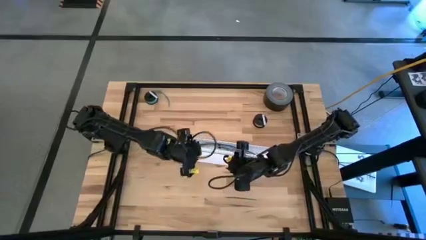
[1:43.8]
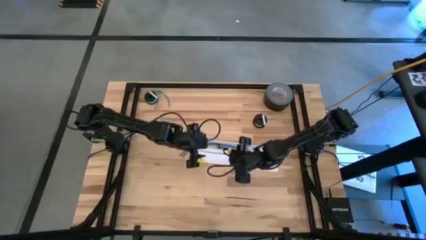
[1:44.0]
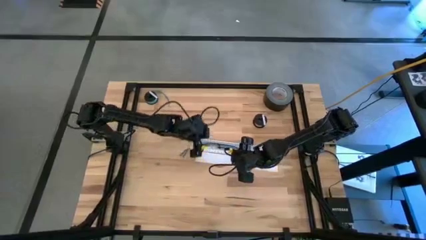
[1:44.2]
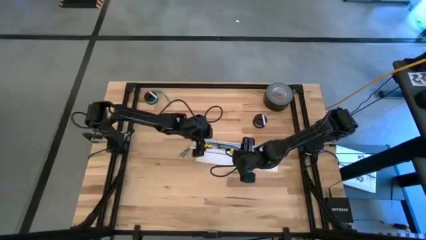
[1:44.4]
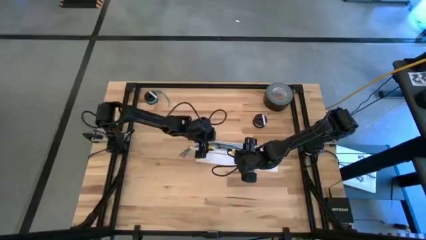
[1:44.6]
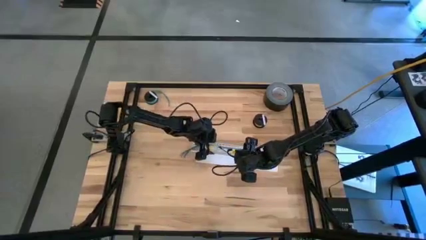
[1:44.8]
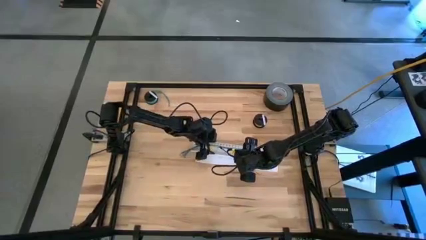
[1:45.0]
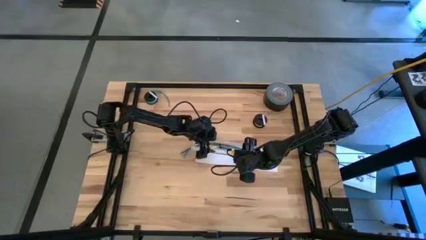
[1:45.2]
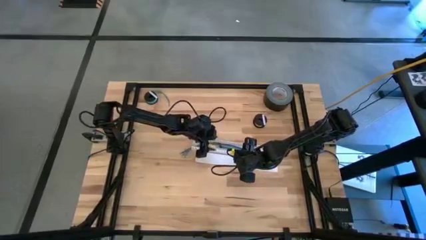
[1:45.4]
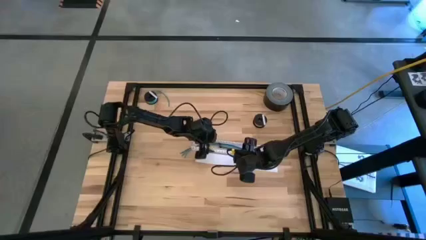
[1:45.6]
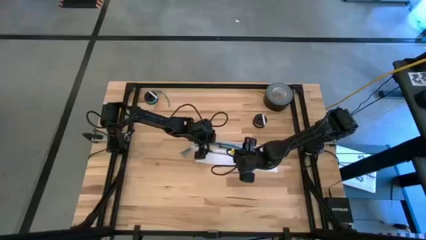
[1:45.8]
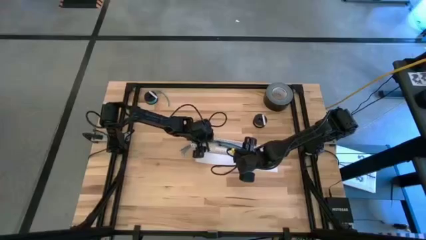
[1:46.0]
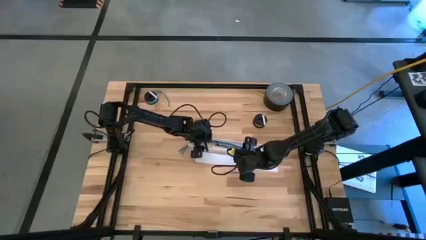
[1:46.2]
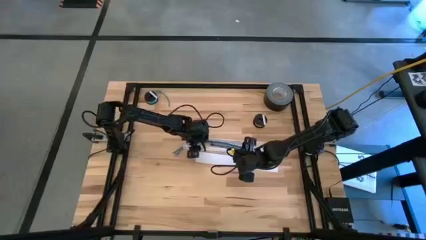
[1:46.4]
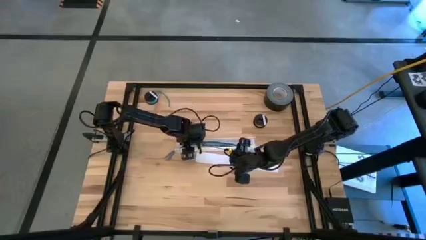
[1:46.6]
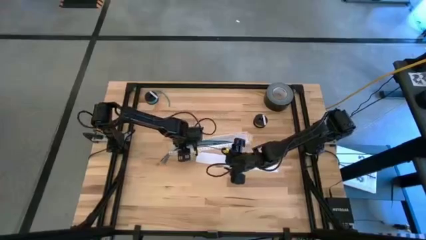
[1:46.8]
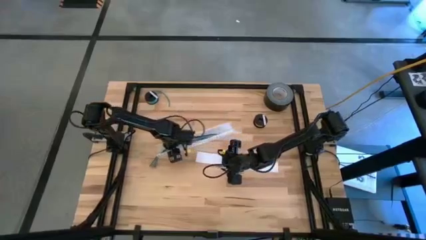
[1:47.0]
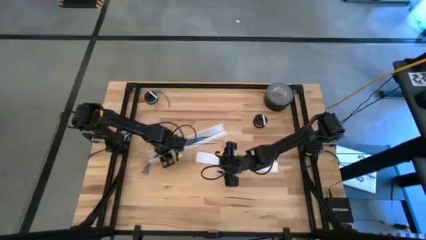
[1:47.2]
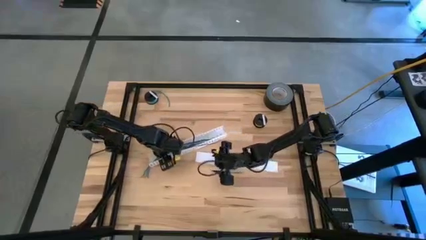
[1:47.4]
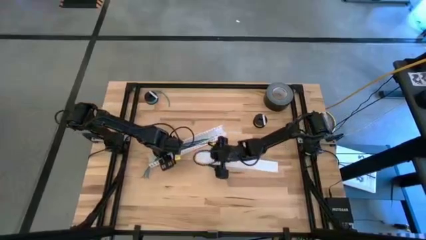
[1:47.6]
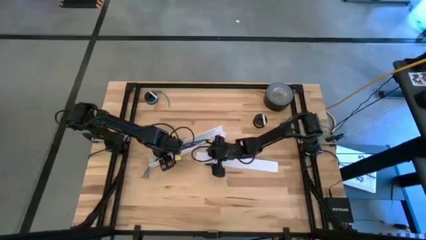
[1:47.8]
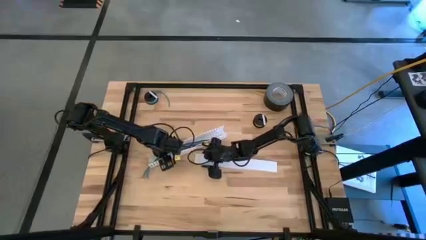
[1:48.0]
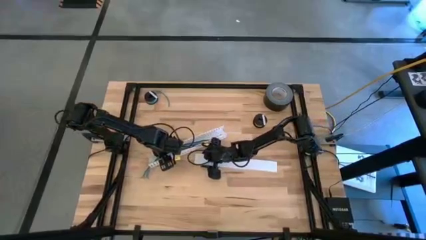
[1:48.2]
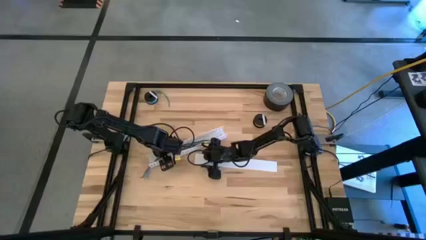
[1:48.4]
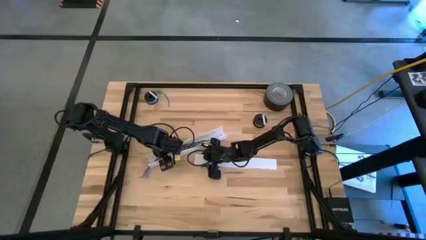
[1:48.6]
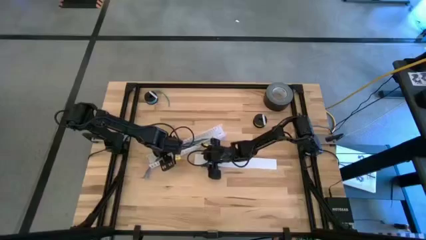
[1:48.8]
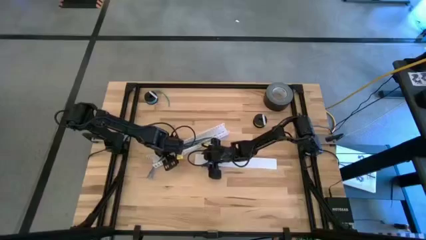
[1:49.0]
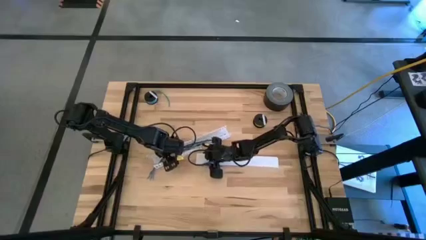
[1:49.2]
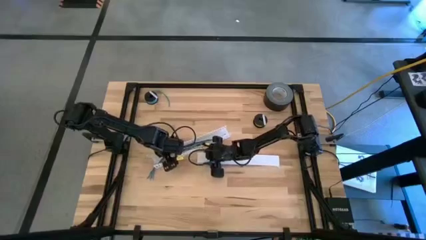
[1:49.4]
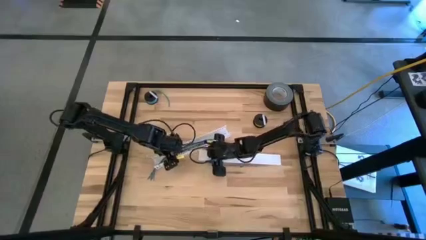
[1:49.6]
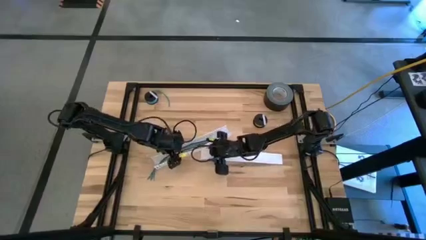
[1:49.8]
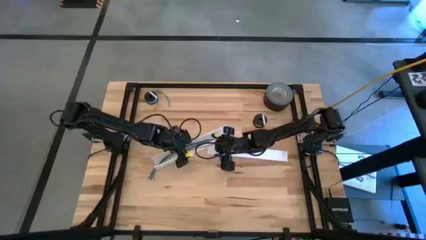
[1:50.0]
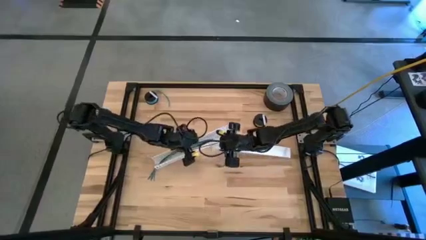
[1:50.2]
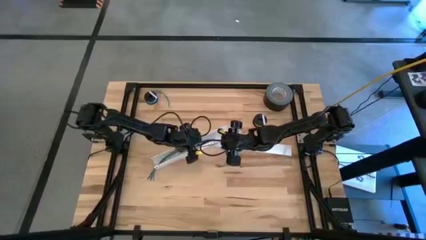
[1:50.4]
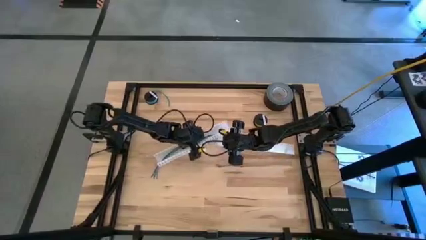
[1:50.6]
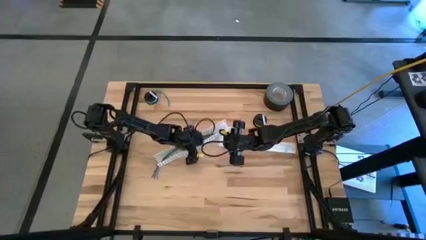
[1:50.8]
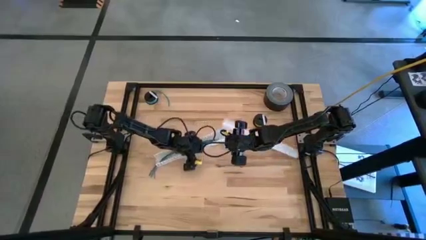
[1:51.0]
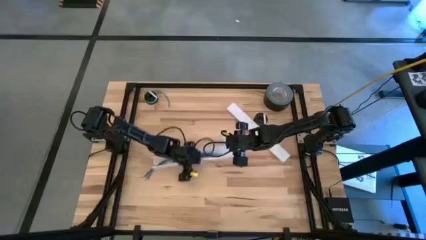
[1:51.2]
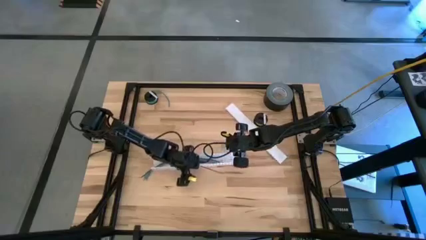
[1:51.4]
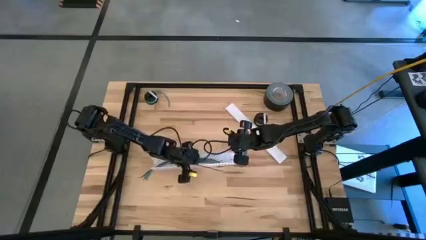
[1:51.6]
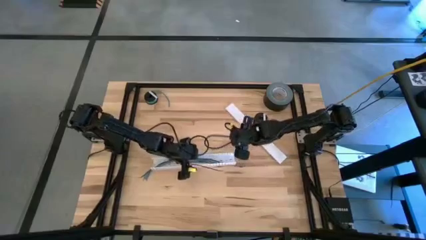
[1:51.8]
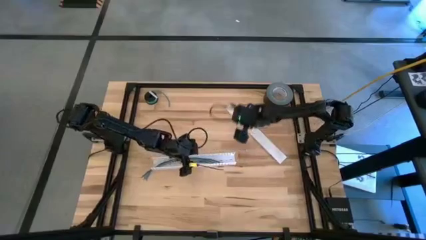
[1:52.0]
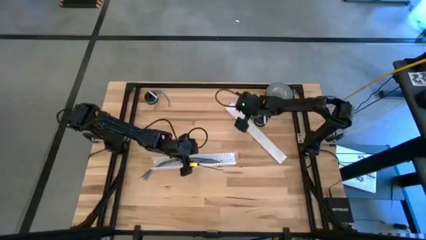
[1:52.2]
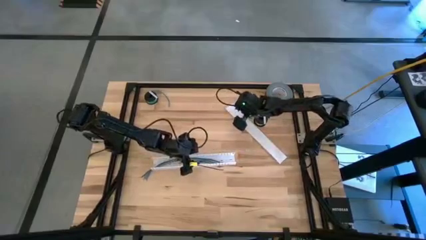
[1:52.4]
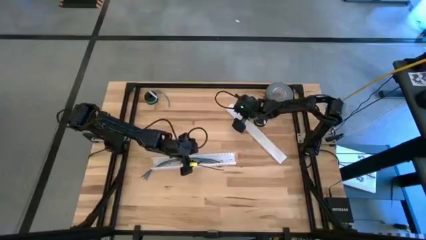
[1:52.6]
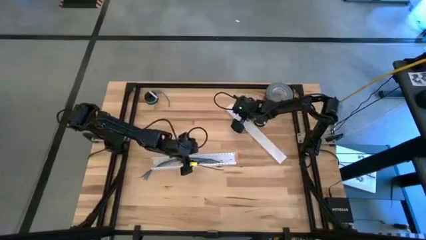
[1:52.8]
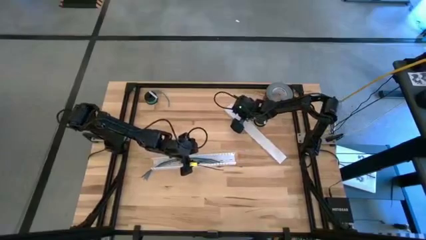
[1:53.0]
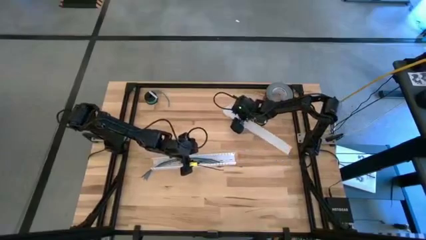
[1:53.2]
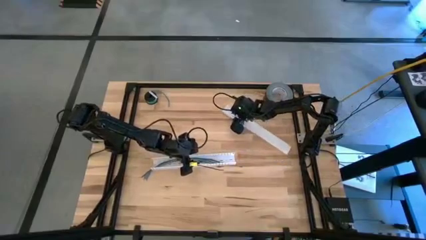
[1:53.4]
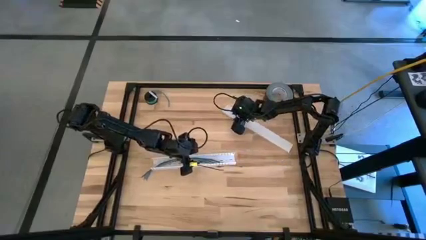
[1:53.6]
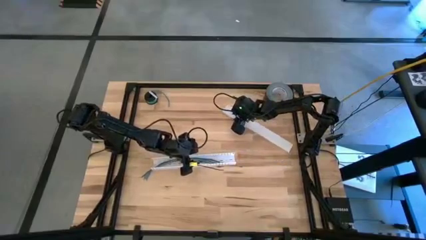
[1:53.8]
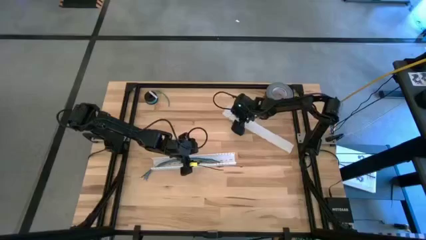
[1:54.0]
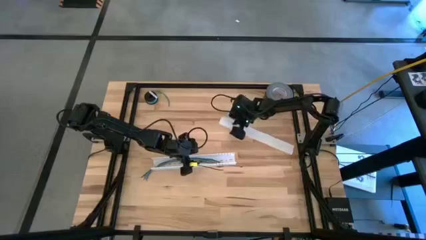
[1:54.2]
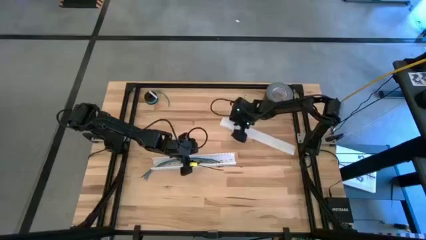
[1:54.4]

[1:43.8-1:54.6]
Task: Ziptie cables
Close the white cable duct

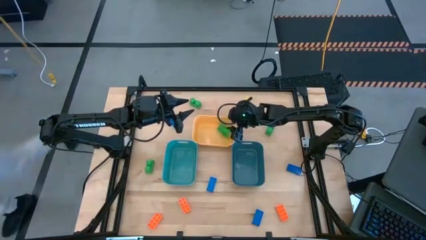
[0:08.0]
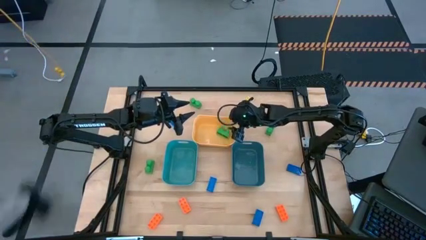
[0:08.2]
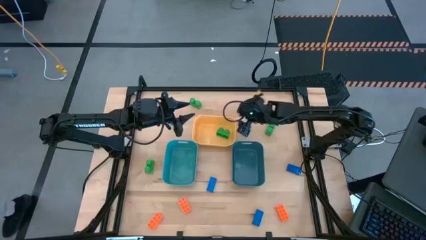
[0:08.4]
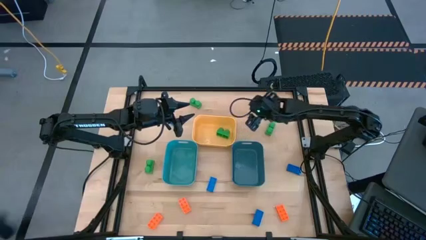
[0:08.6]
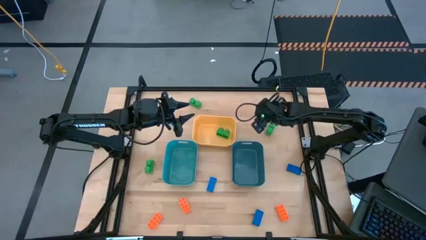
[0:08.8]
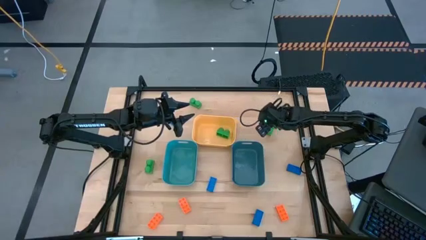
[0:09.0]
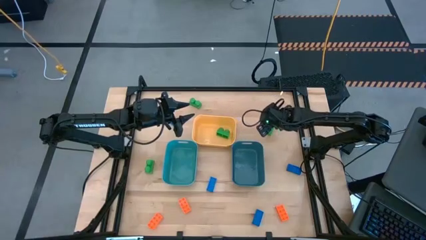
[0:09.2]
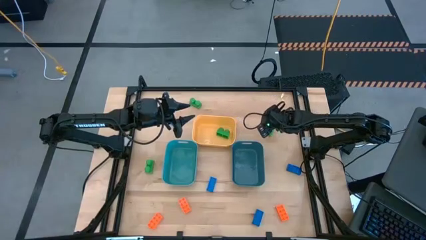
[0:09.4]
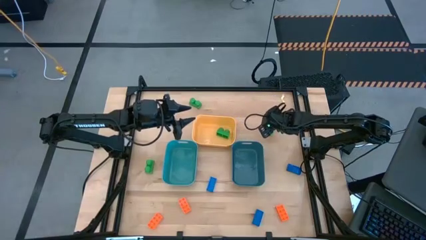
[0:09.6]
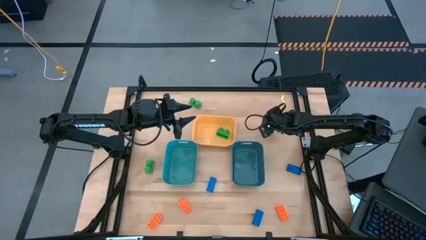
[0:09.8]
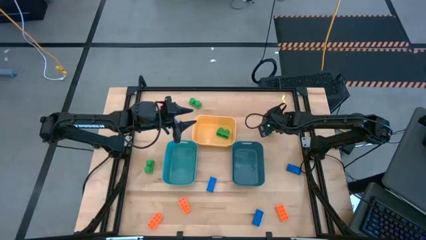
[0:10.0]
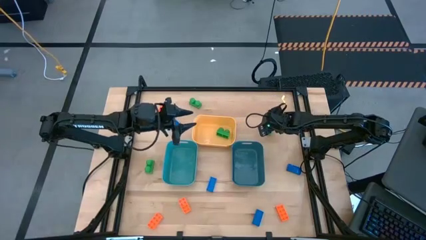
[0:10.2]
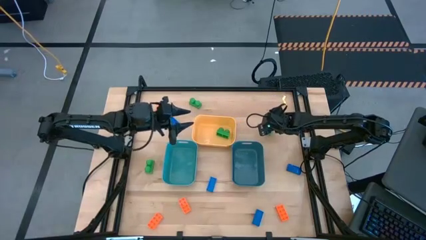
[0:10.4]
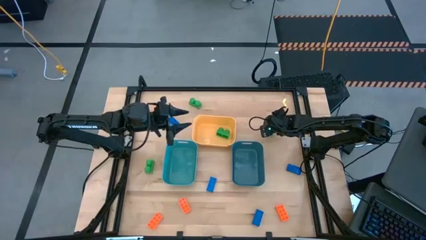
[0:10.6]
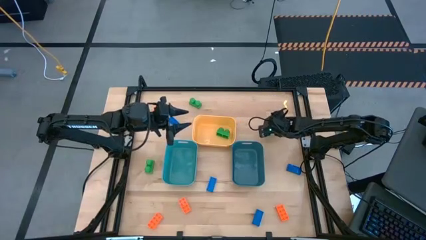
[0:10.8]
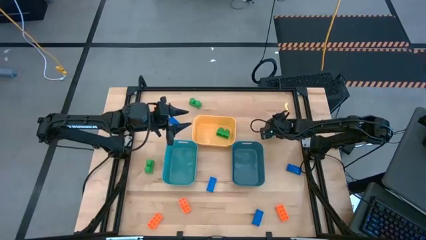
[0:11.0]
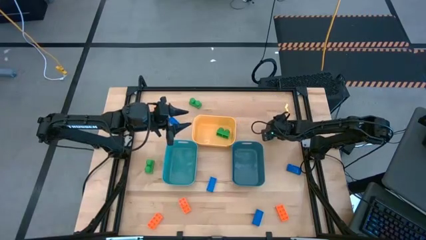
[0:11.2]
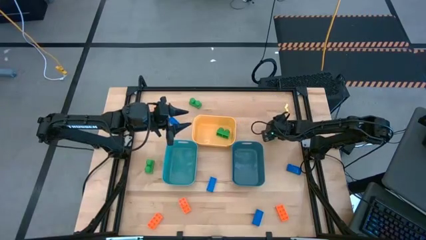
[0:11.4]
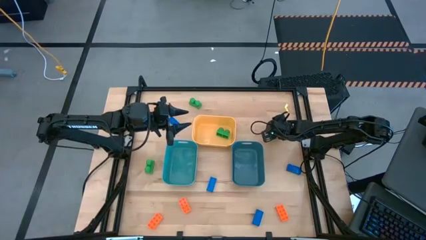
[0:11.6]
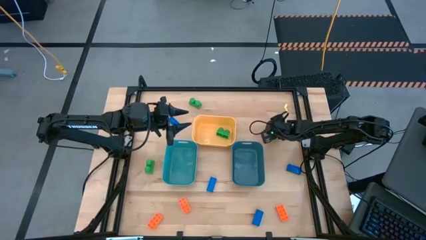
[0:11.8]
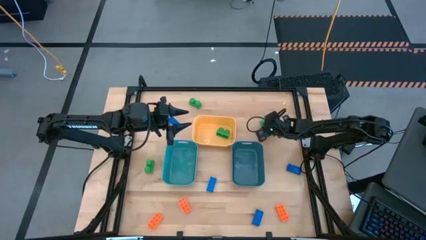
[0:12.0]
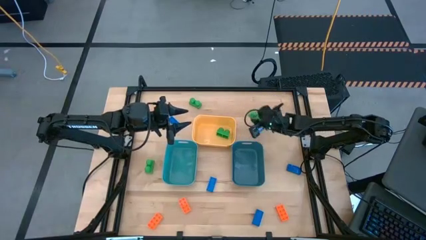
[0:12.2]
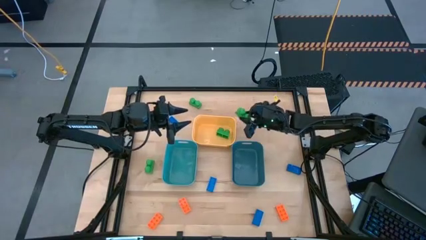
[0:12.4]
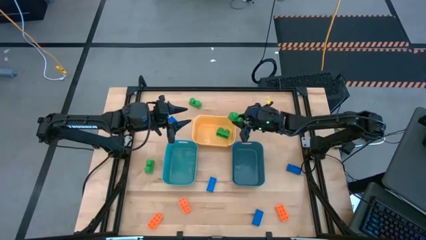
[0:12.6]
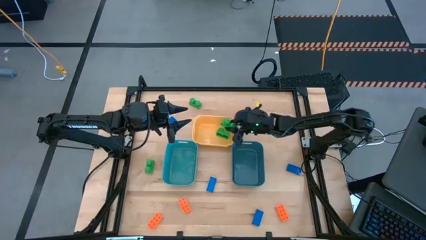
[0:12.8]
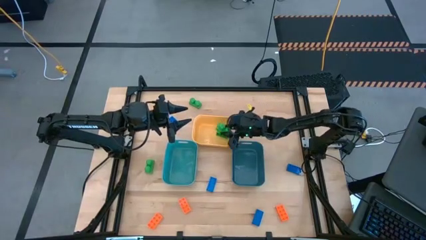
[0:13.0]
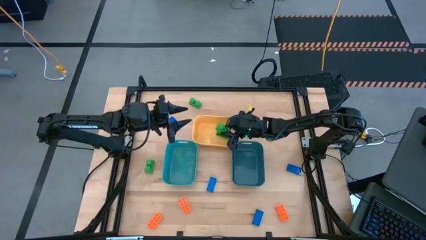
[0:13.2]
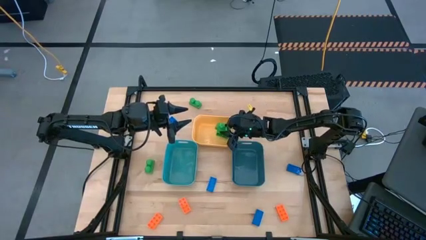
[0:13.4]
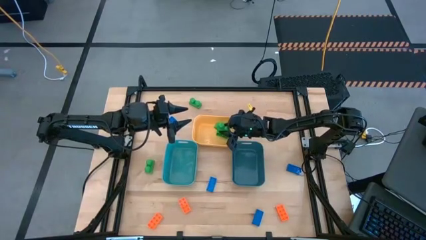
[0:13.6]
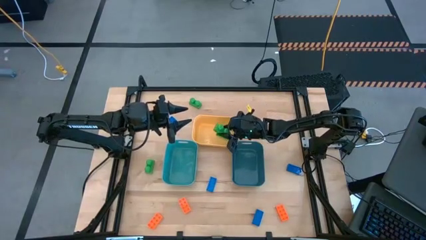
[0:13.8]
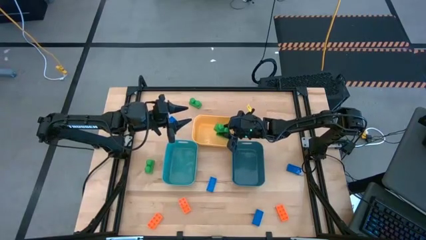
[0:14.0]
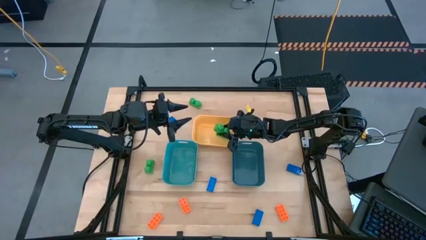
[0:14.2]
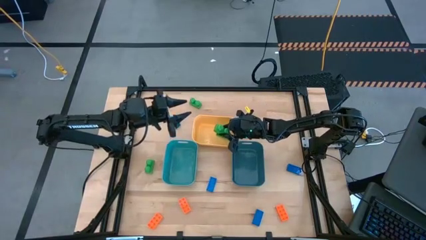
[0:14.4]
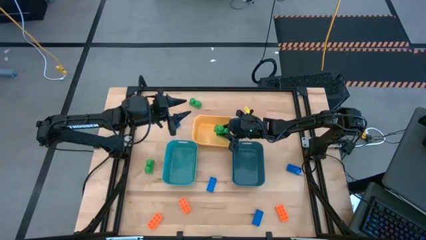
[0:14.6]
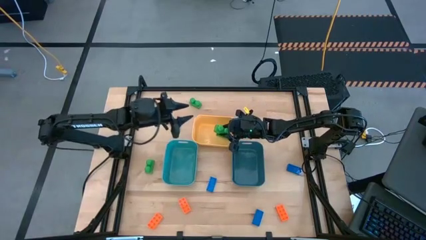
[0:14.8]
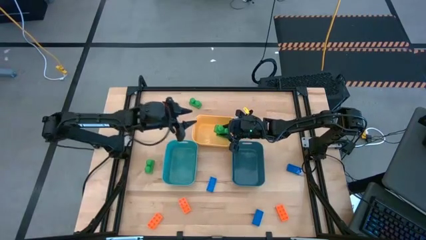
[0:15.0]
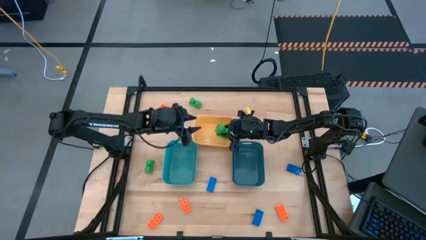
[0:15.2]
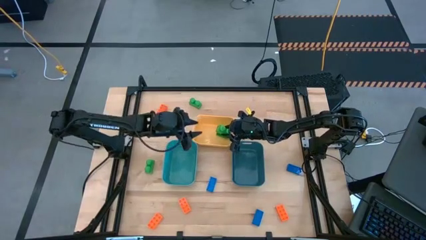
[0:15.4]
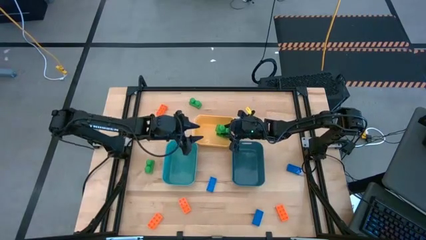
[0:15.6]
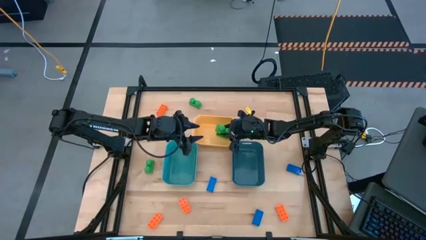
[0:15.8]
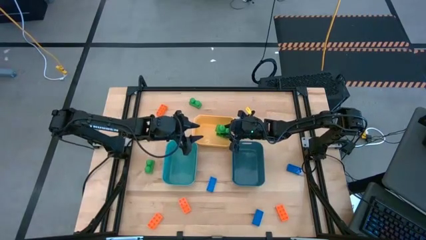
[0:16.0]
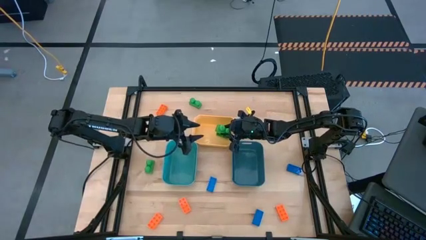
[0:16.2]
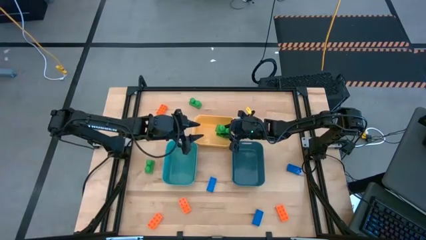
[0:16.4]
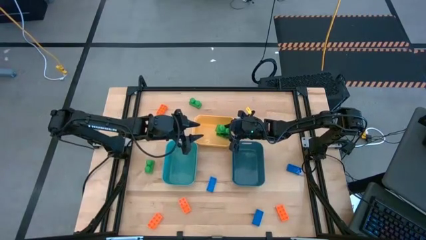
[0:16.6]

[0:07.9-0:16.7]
Task: Sort & place blocks by color
Put the green game piece into the yellow bin
